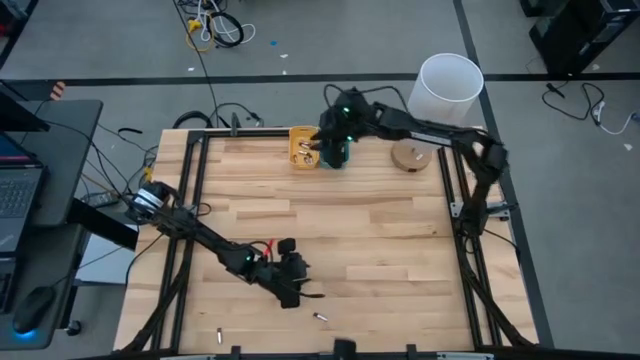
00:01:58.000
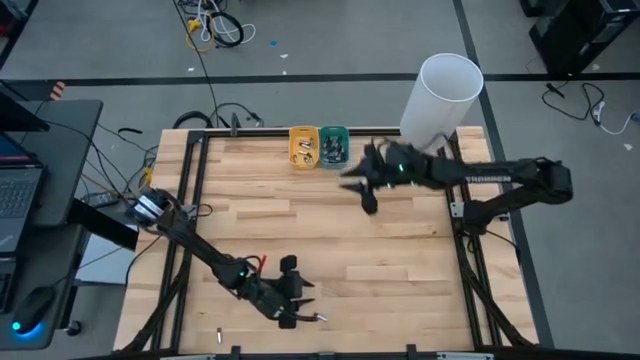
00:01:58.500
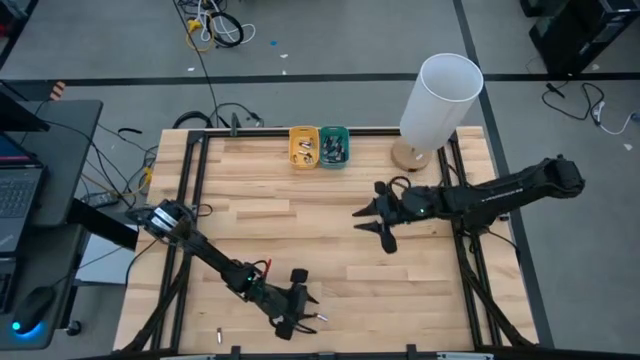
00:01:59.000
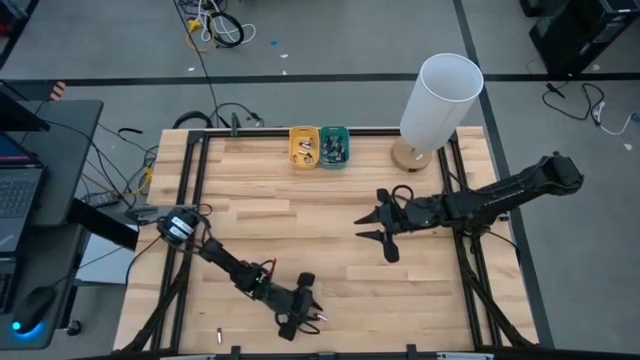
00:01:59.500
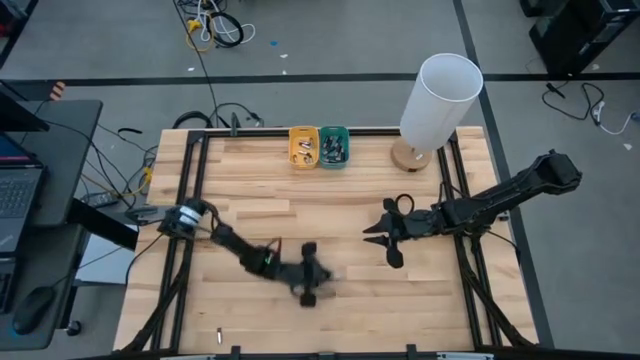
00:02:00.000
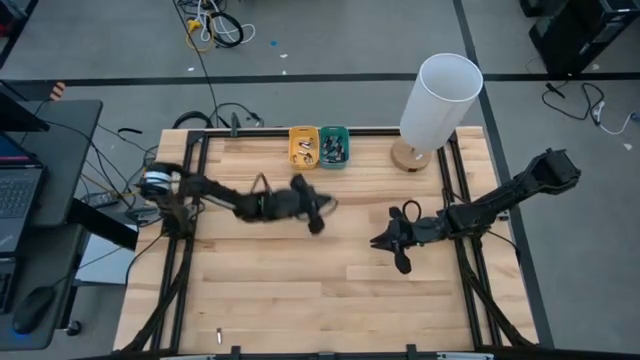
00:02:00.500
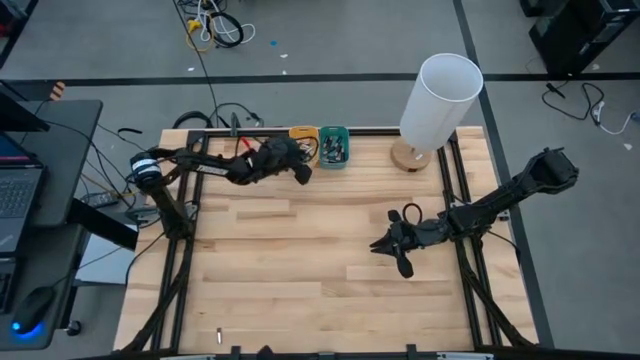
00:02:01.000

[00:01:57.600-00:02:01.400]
Task: Sort batteries
Put the silver battery into the yellow bin

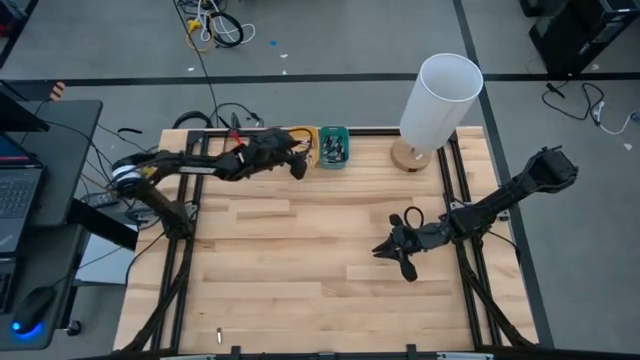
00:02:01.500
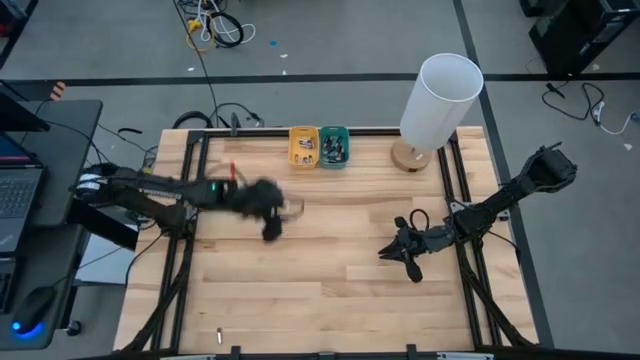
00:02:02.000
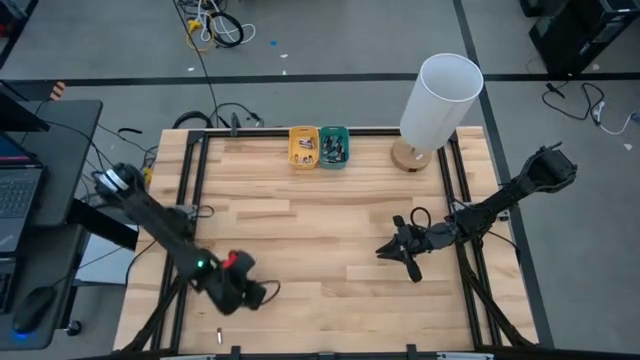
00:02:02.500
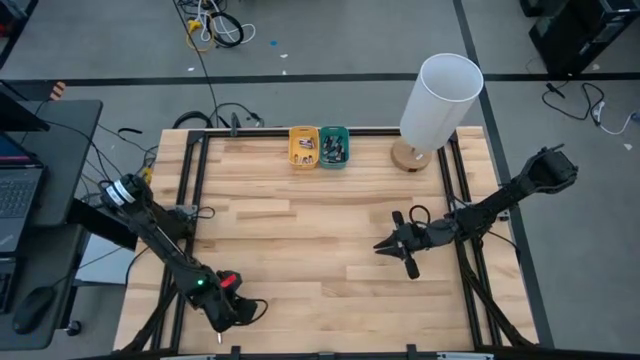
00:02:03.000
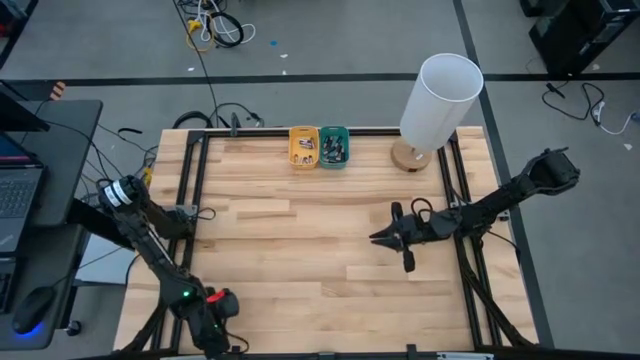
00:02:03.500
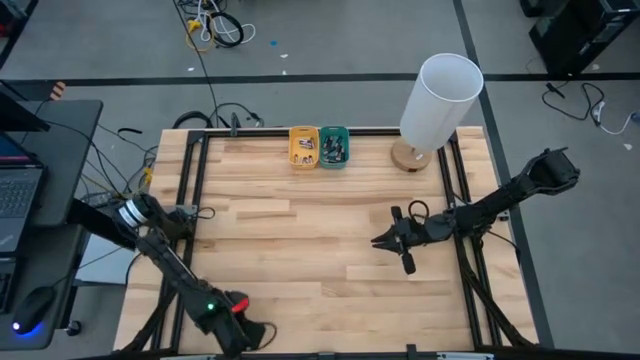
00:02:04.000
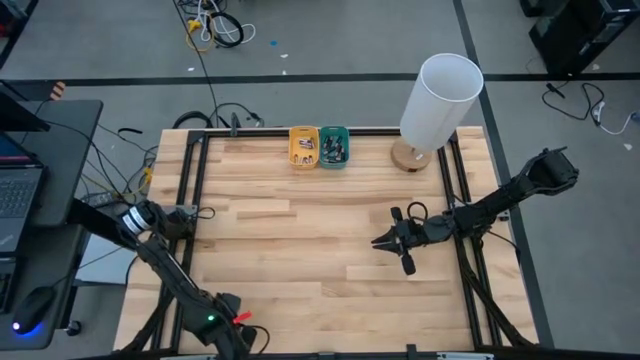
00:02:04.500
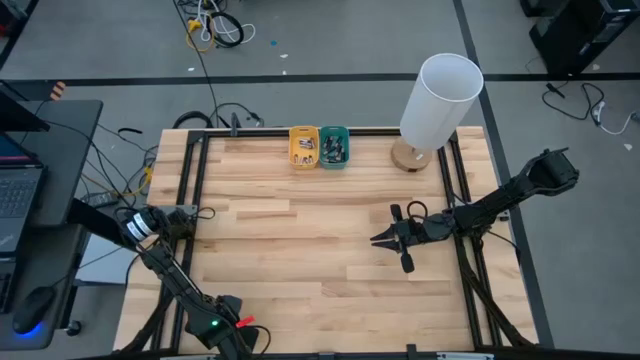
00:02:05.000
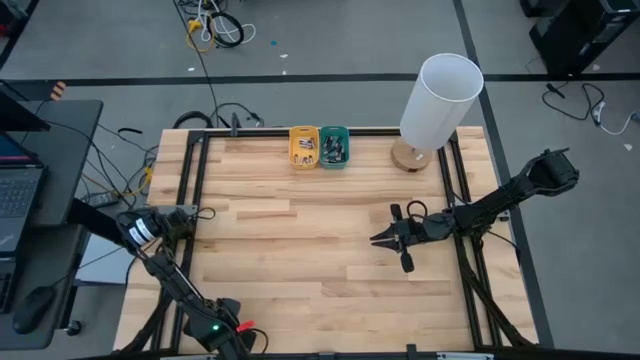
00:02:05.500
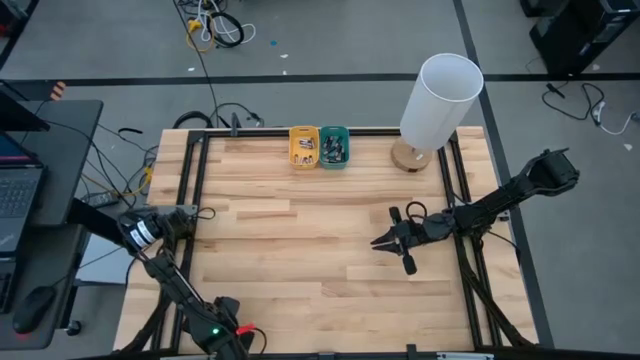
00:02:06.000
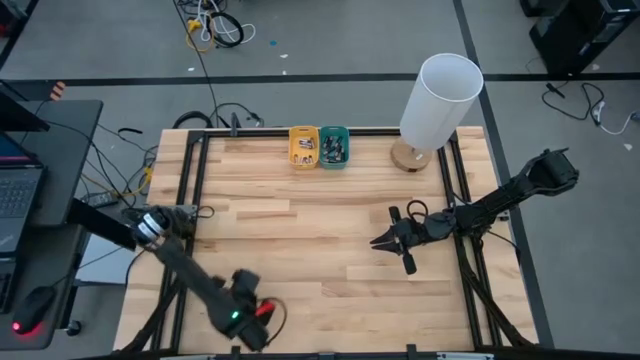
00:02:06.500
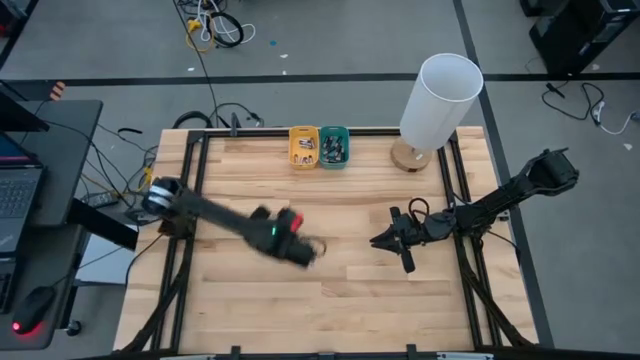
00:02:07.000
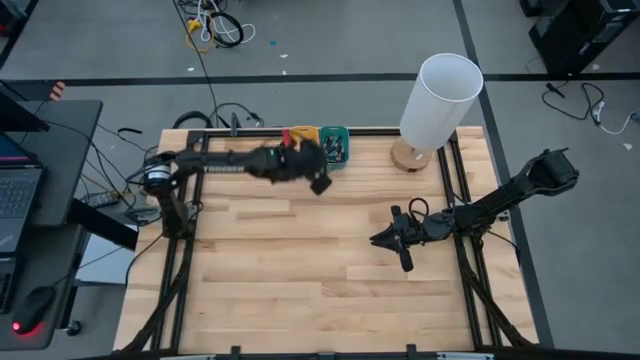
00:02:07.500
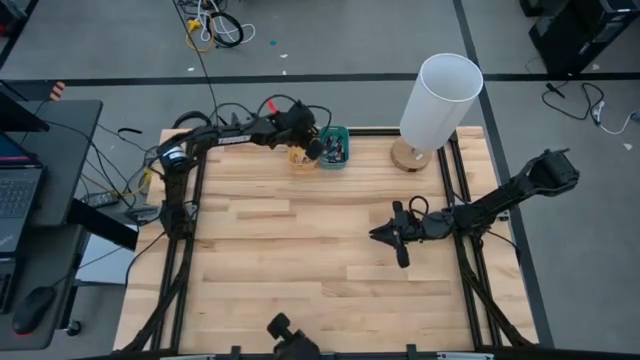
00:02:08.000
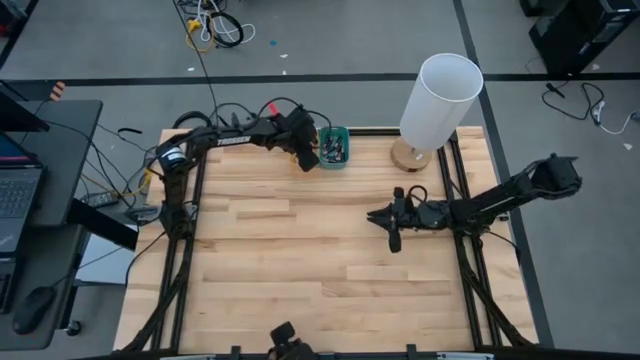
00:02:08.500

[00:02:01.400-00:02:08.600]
Put the silver battery into the yellow bin

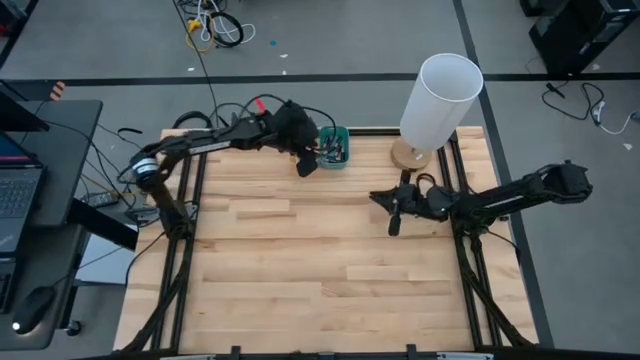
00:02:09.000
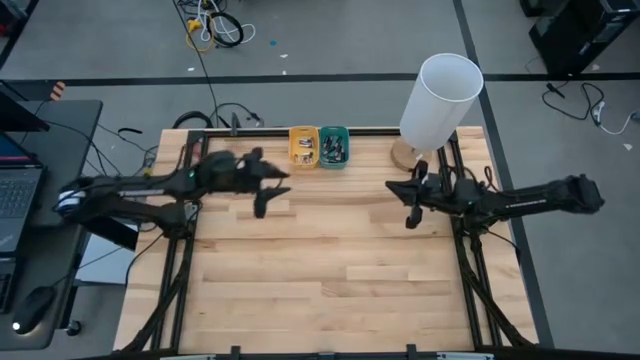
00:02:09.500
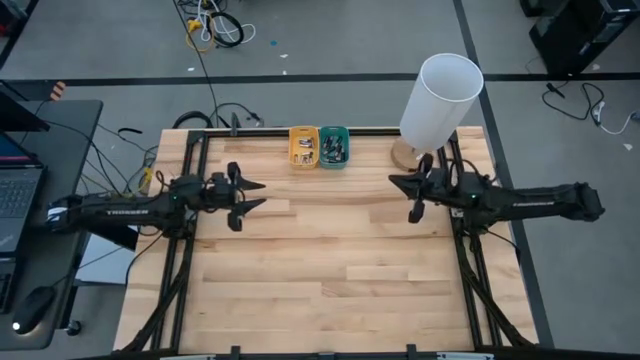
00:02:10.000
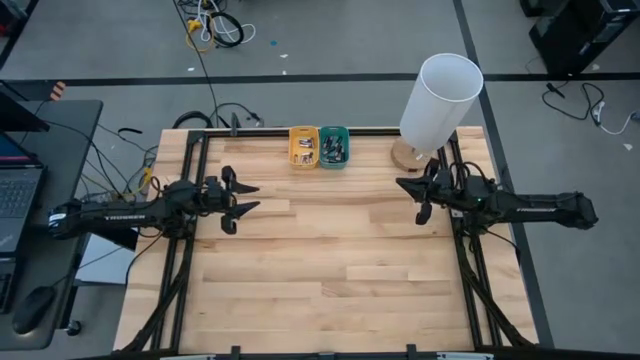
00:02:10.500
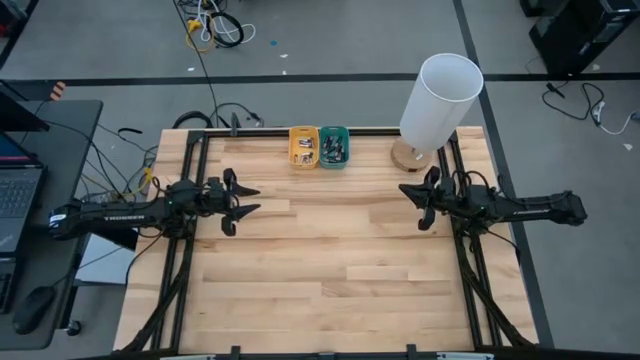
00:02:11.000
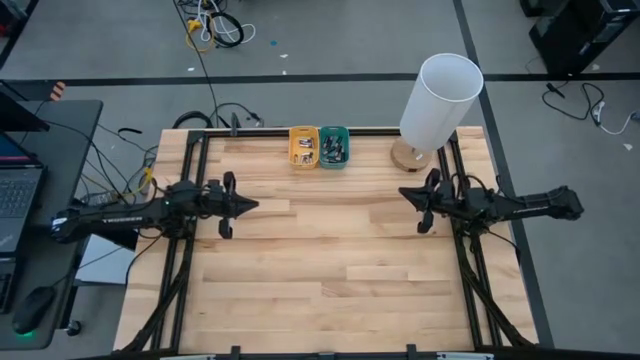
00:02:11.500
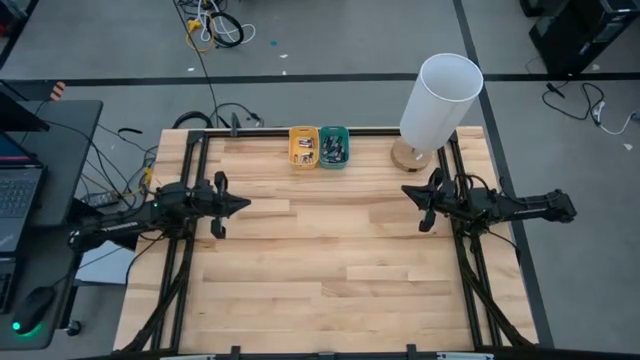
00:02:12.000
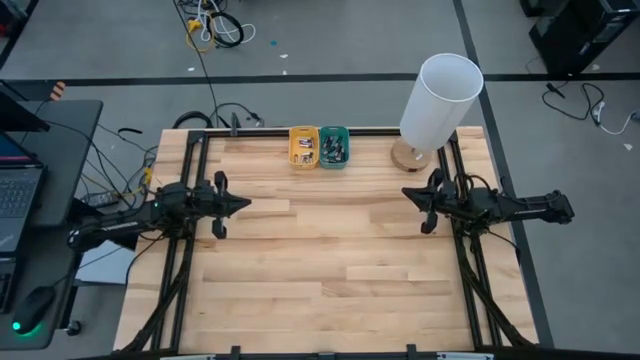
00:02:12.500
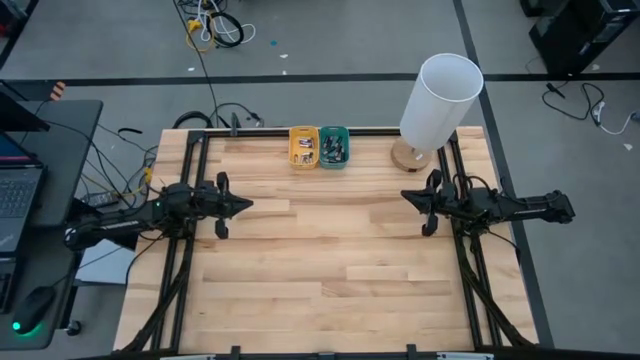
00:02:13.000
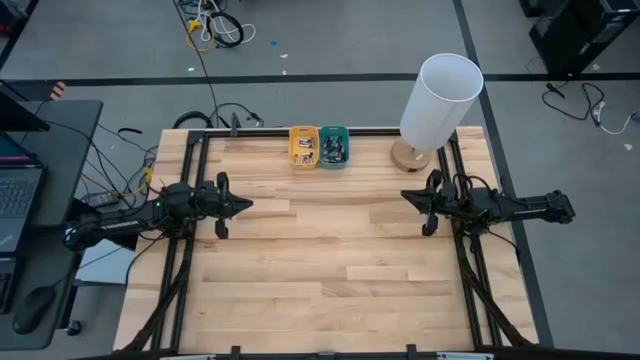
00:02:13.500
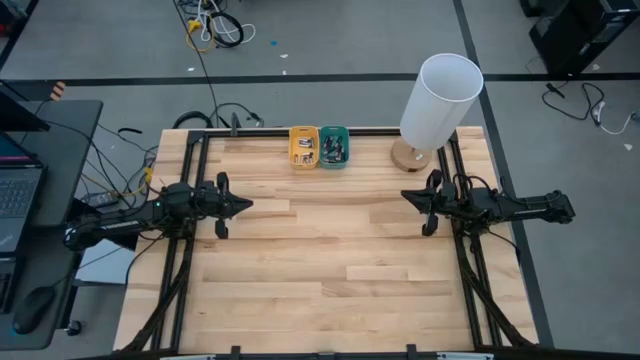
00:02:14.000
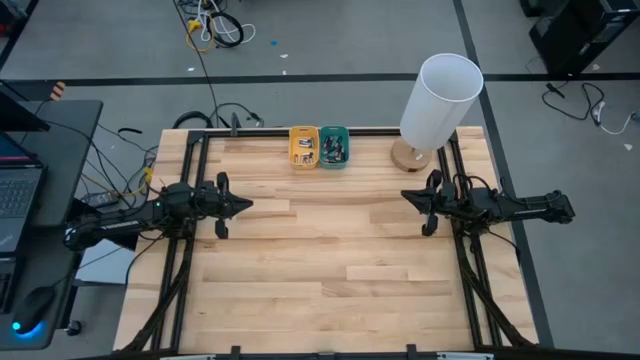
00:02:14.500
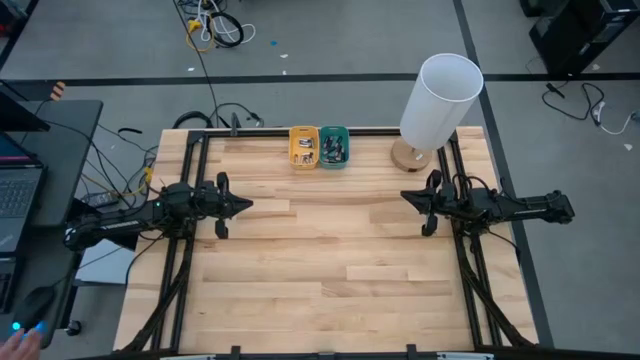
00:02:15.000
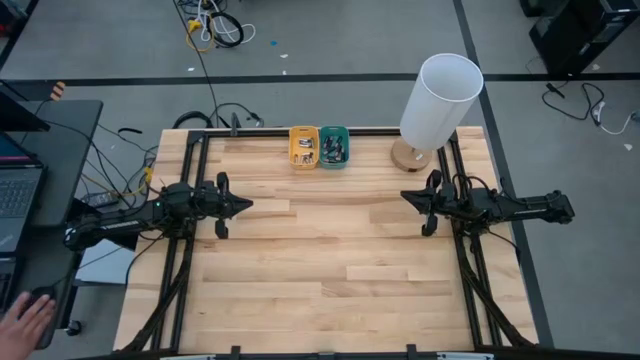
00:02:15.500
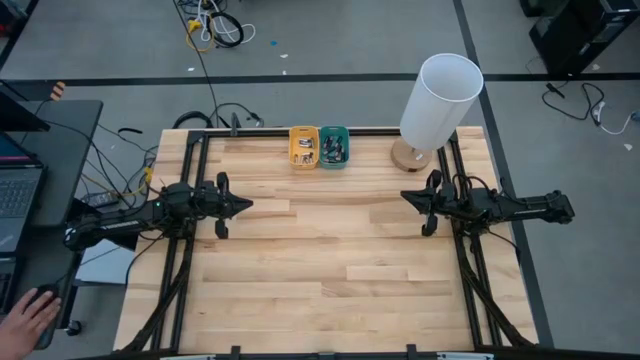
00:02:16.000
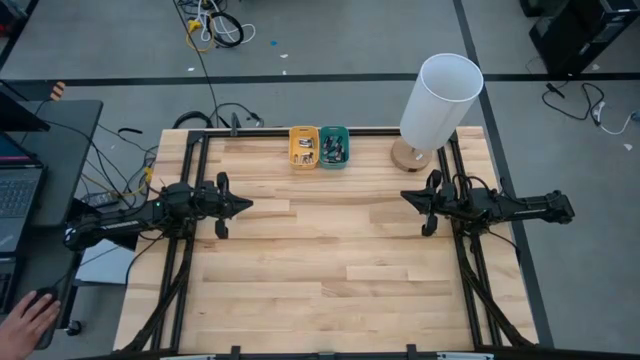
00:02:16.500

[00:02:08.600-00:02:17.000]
Return to Home Position

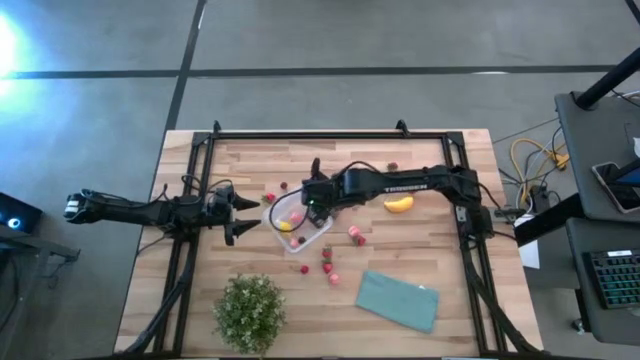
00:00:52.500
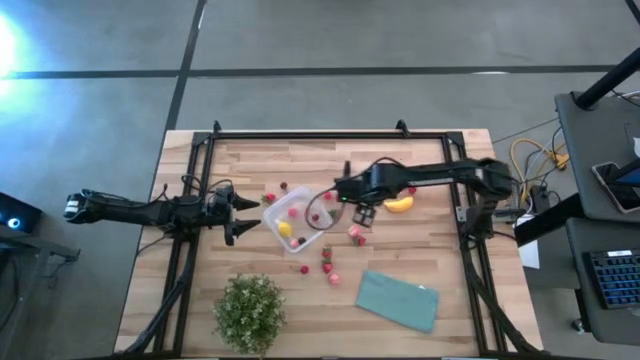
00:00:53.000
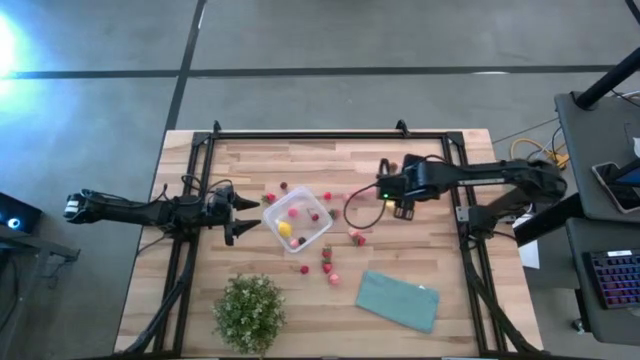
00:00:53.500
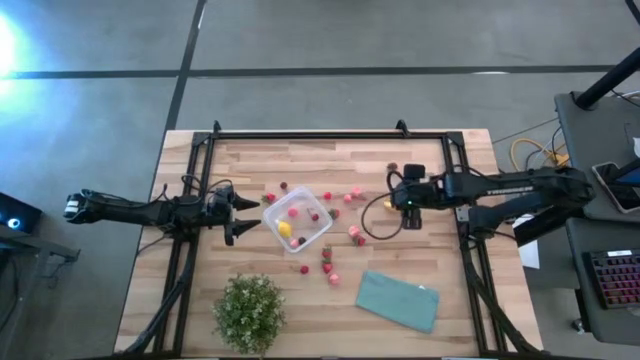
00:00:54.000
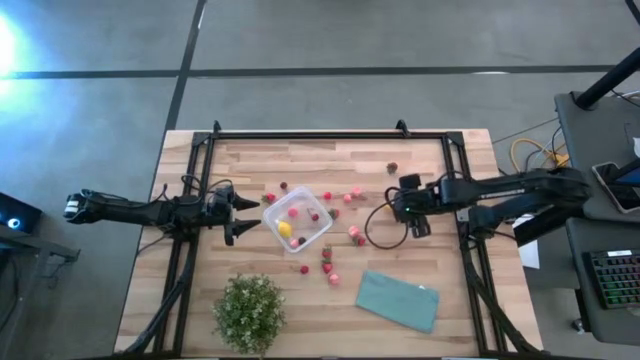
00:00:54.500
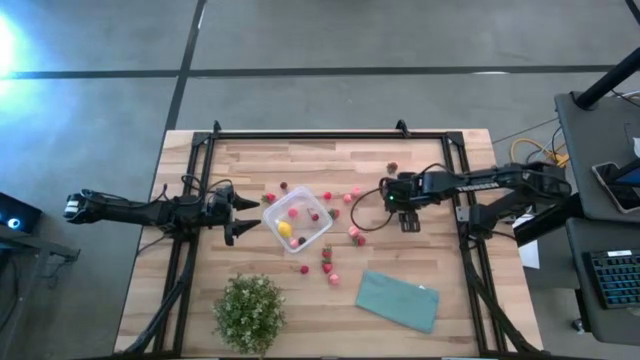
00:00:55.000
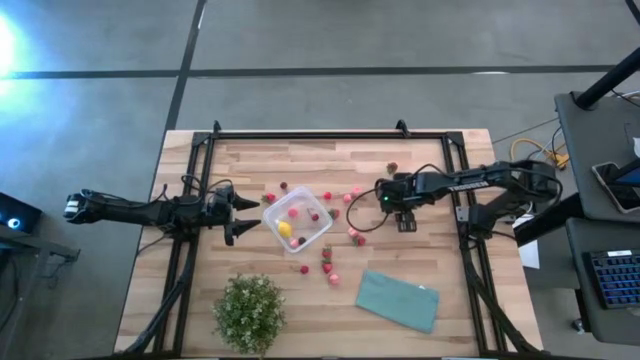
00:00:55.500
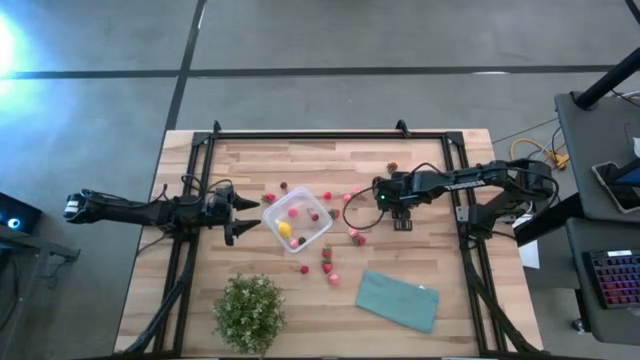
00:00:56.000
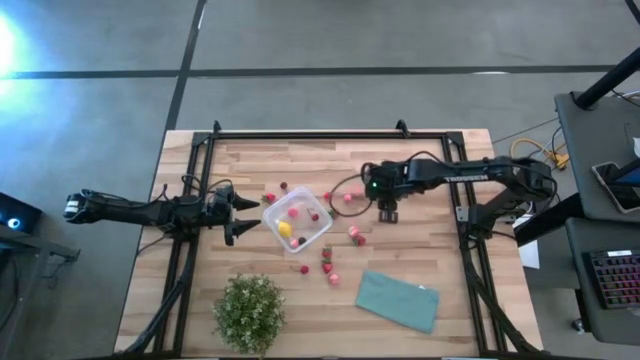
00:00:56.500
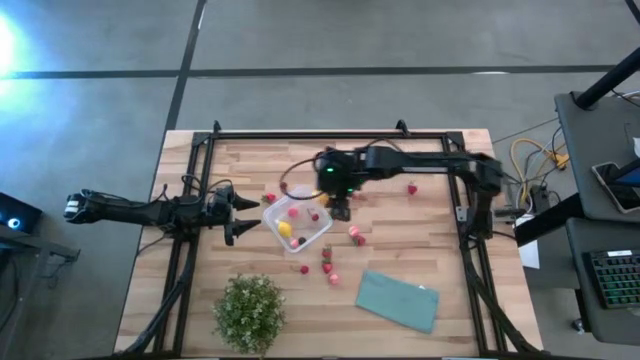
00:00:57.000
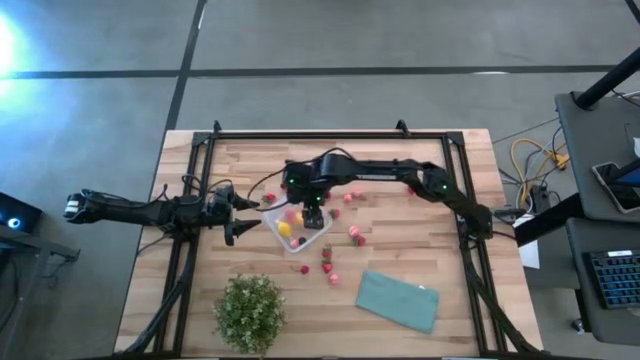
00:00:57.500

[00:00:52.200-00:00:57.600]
Task: Pick and placing Produce into tupperware
Put the yellow banana into the transparent bin
